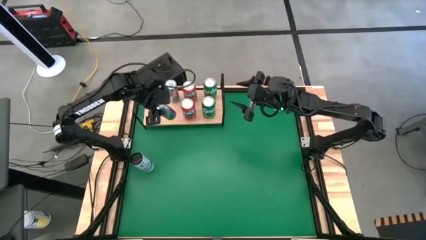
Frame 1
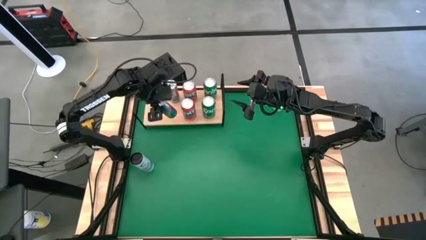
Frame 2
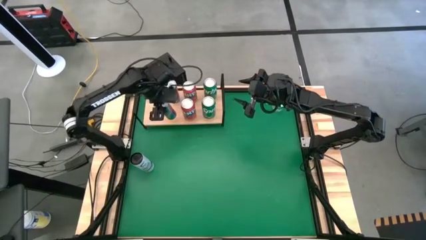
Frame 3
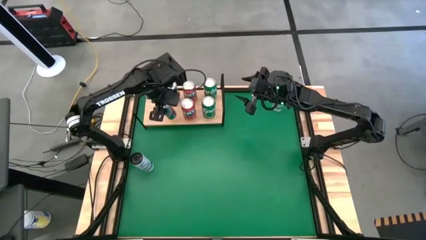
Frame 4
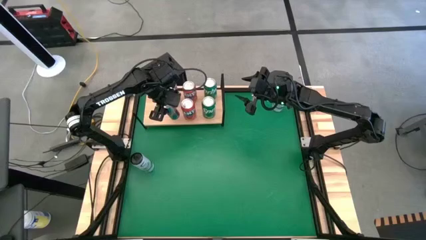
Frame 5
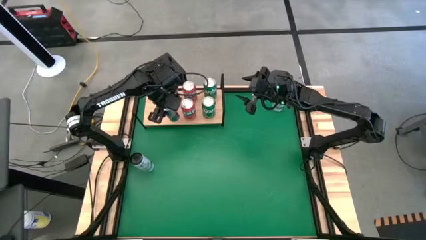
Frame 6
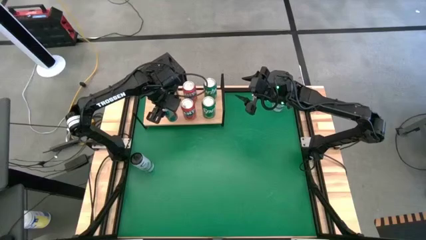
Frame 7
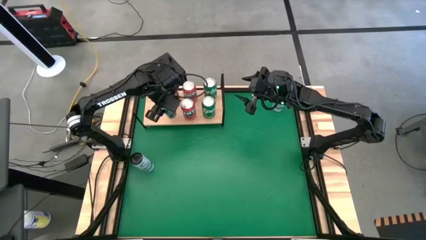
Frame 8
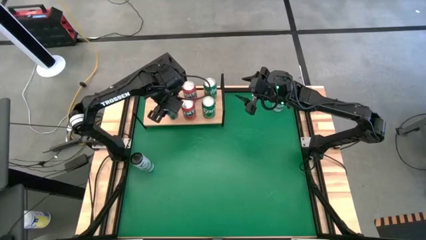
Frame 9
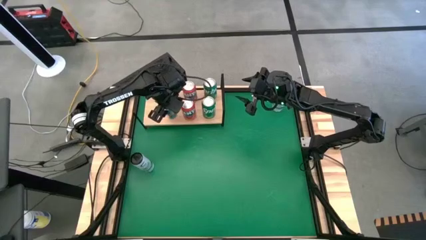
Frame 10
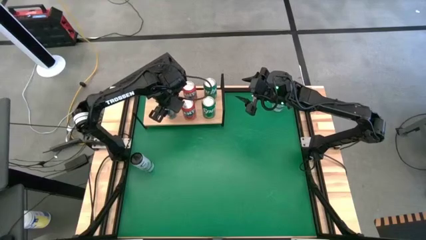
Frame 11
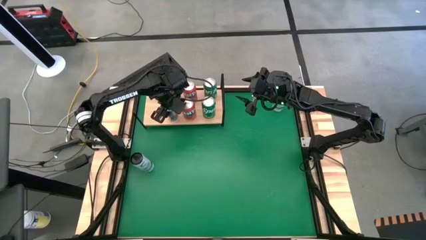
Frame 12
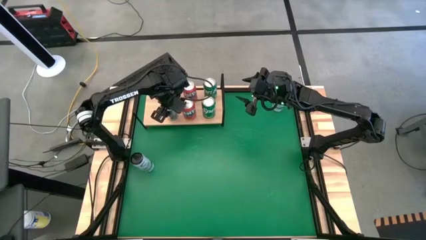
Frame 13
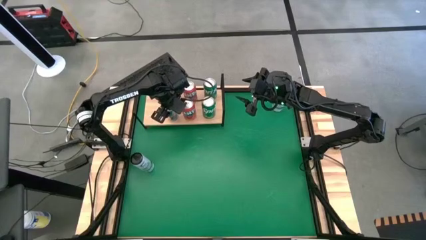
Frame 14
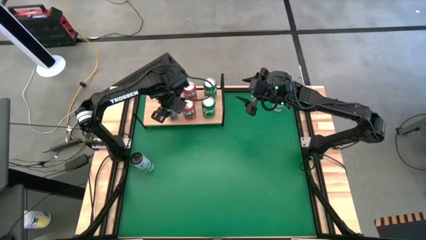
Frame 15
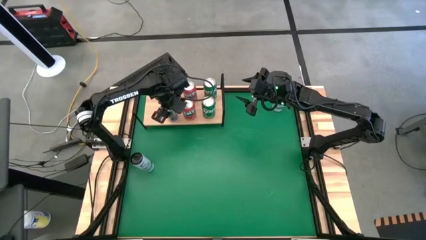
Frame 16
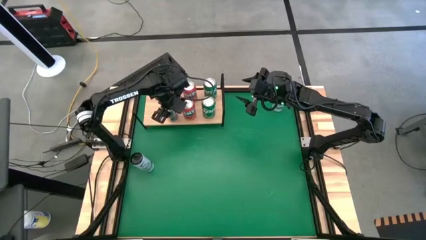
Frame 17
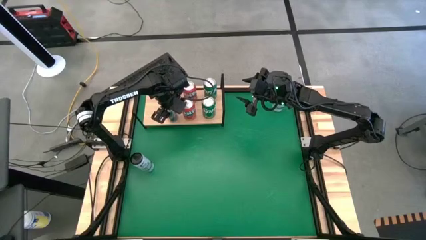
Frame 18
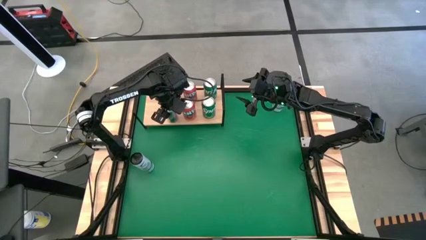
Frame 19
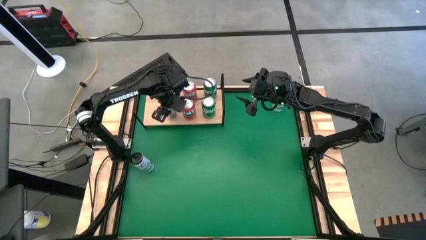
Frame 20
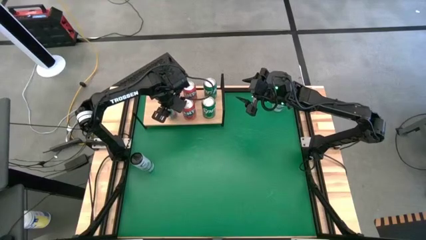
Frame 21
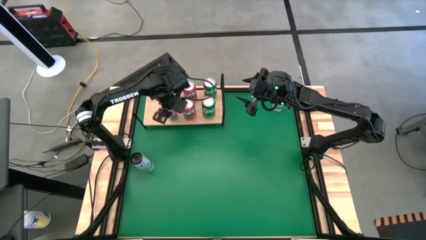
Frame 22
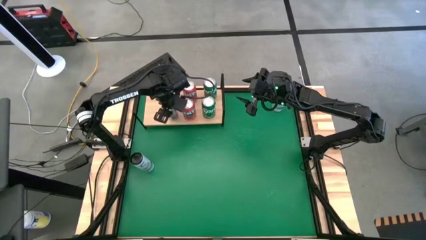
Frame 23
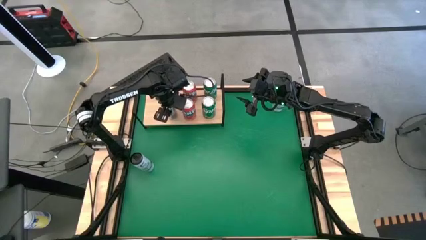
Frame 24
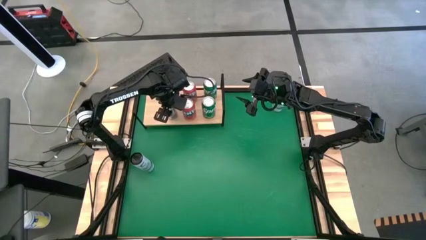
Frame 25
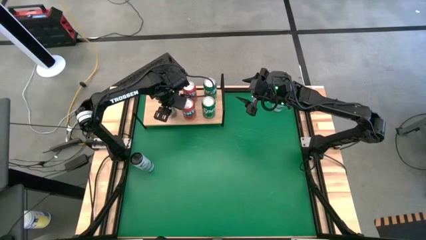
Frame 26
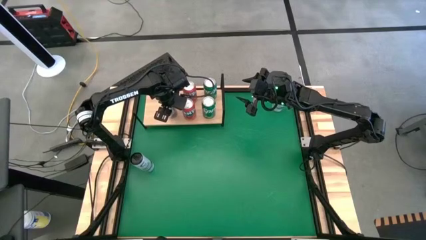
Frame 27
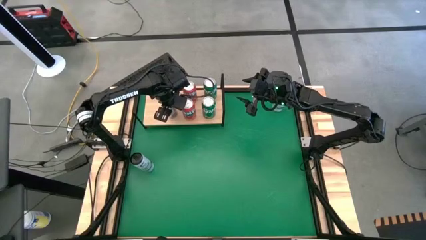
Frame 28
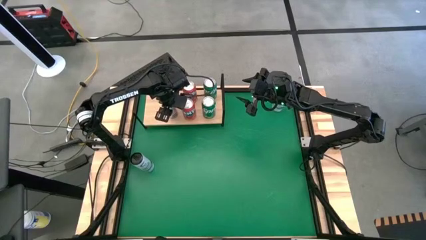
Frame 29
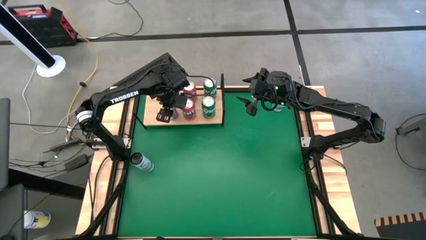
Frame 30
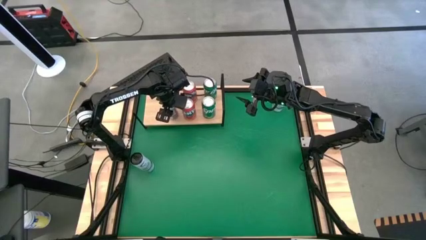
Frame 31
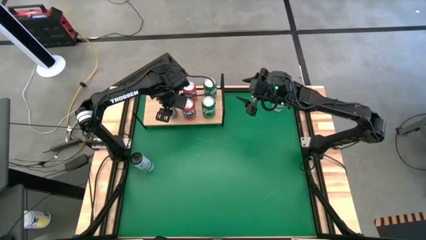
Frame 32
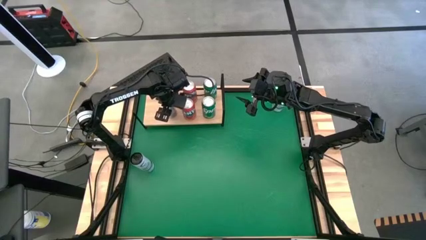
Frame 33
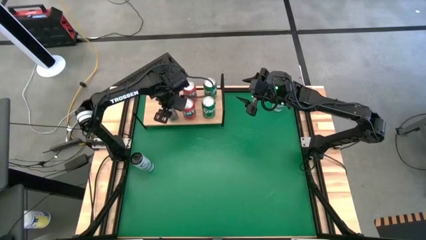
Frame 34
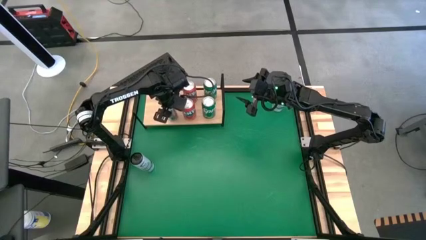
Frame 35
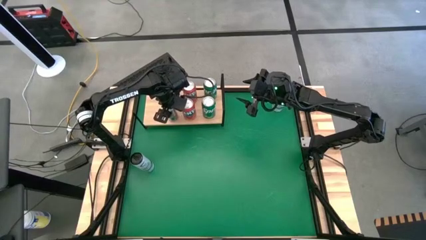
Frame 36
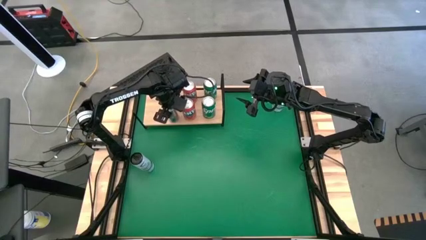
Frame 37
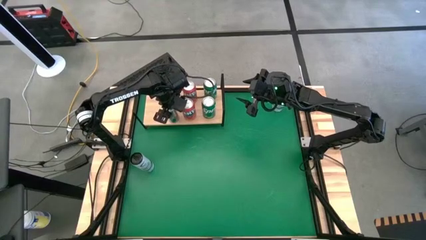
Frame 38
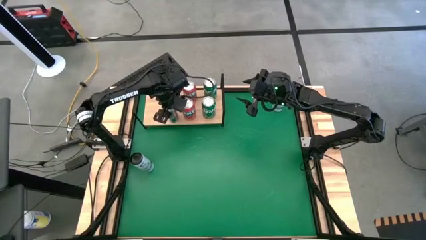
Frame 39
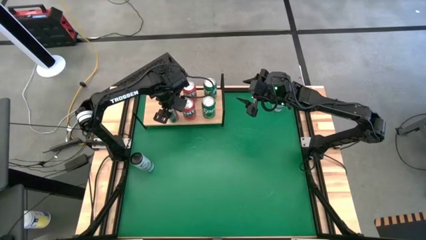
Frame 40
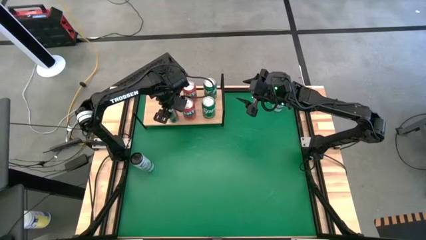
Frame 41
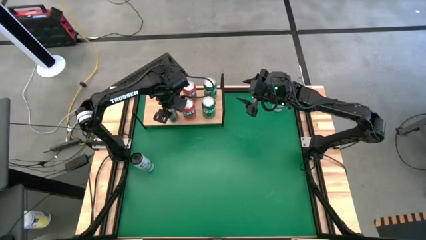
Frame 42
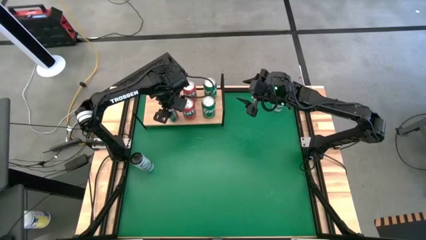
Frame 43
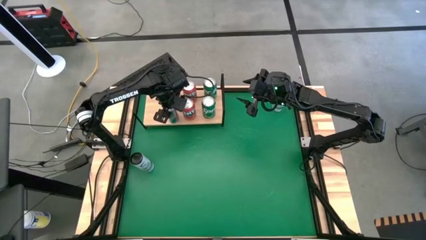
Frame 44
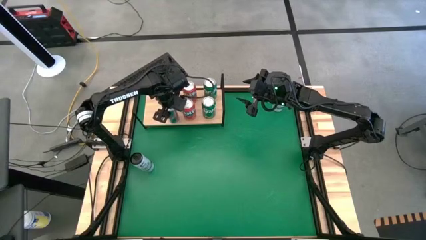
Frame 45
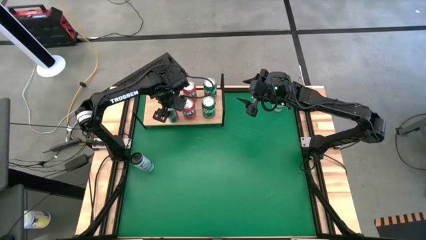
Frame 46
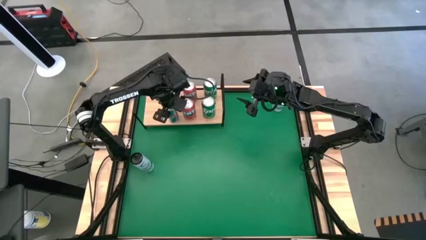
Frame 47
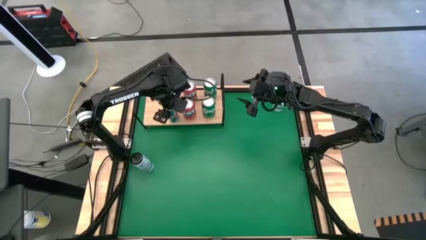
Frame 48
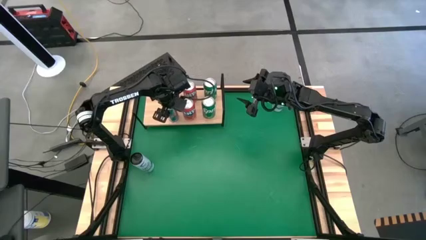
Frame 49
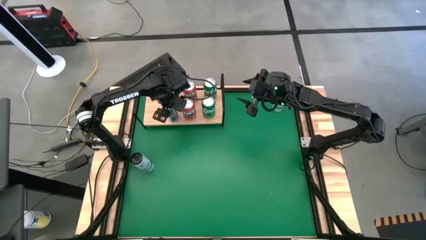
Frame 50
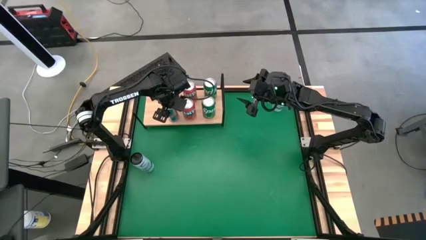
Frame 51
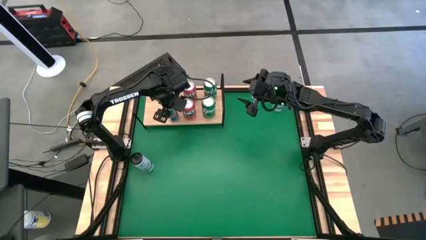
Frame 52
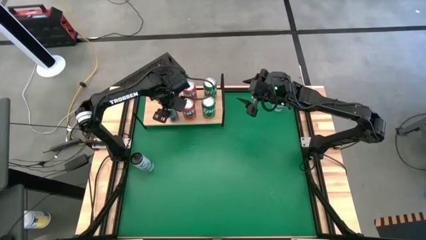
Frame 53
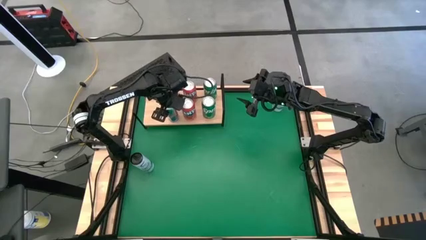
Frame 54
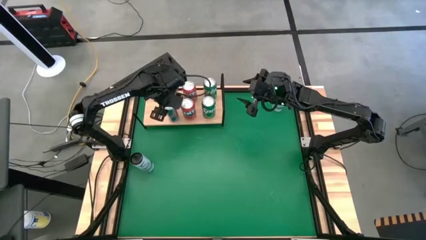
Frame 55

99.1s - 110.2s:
Task: Place canned beverage on shelf
Put the blue soda can aligned with the other blue soda can on the shelf

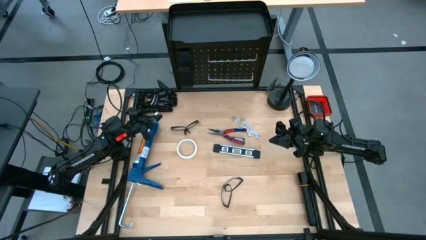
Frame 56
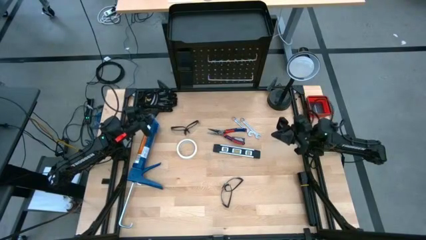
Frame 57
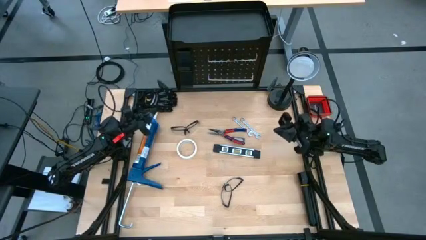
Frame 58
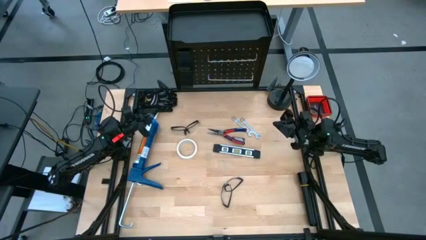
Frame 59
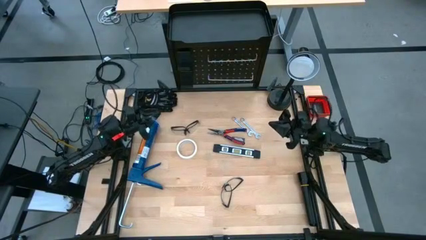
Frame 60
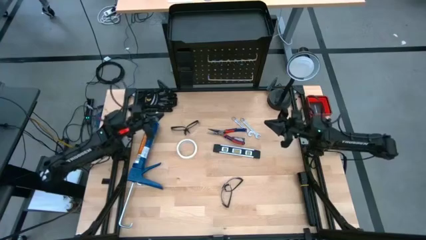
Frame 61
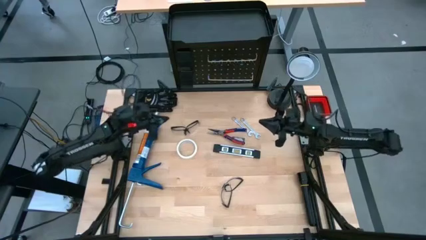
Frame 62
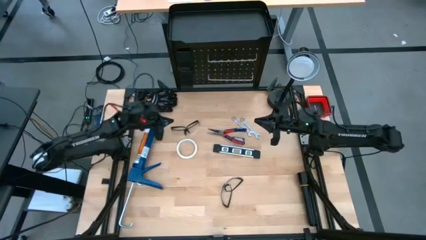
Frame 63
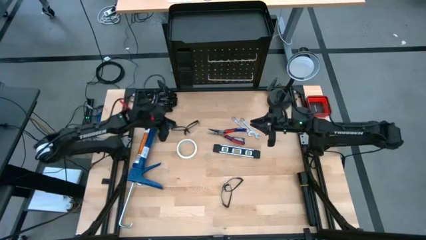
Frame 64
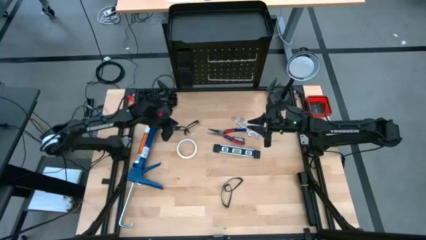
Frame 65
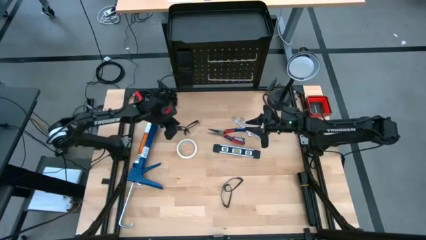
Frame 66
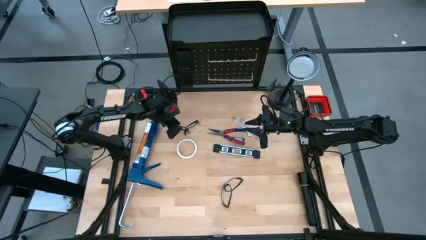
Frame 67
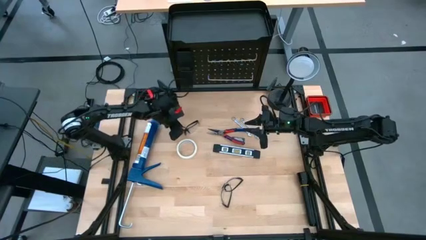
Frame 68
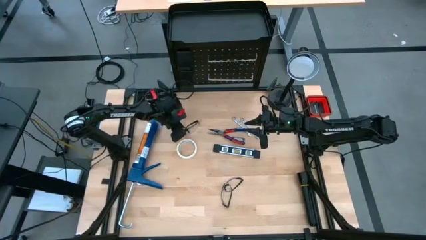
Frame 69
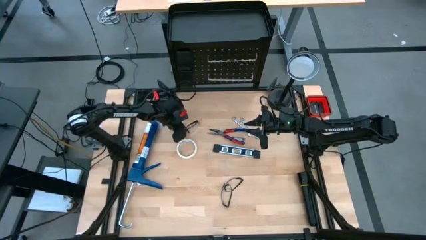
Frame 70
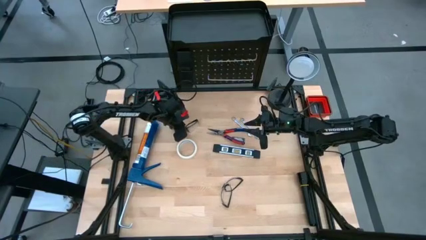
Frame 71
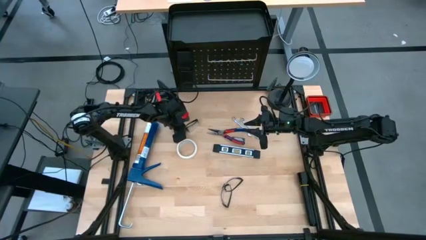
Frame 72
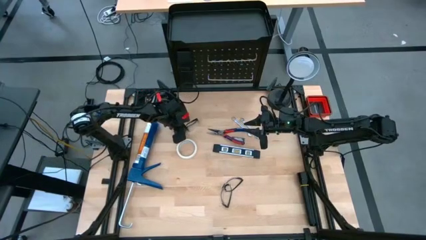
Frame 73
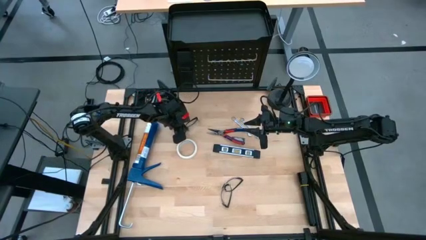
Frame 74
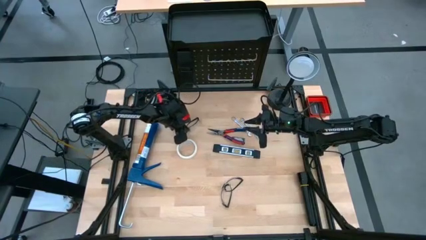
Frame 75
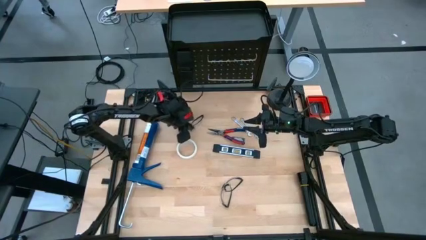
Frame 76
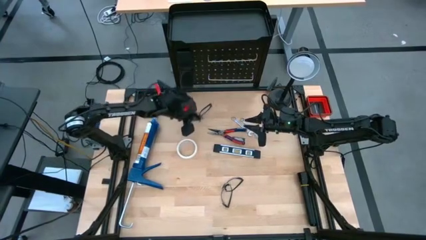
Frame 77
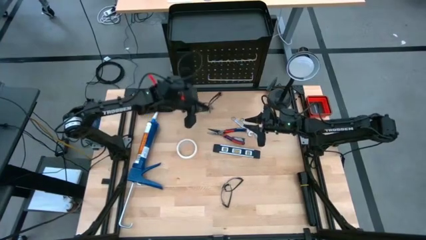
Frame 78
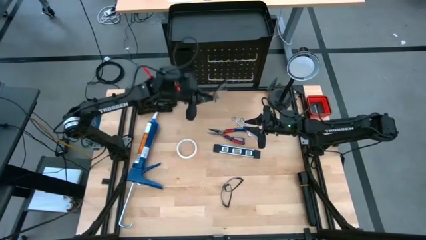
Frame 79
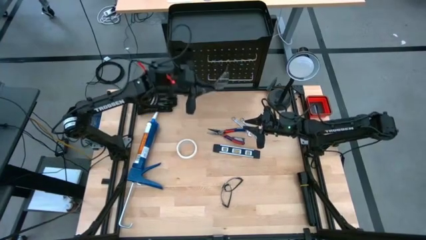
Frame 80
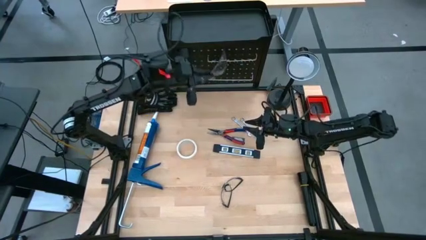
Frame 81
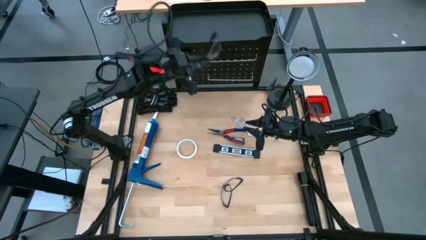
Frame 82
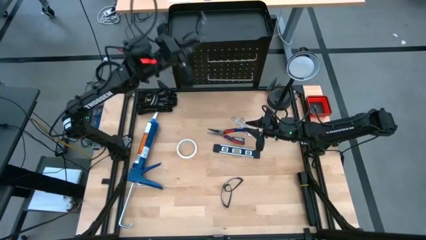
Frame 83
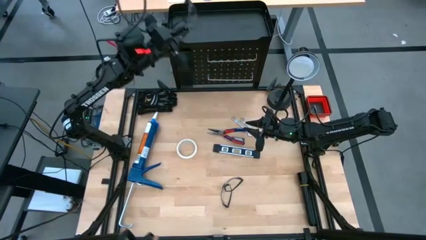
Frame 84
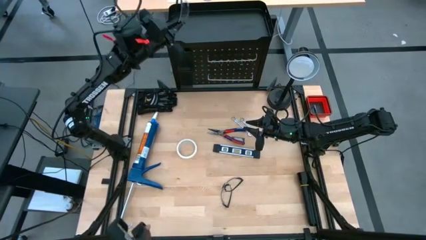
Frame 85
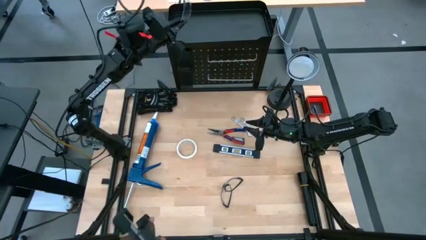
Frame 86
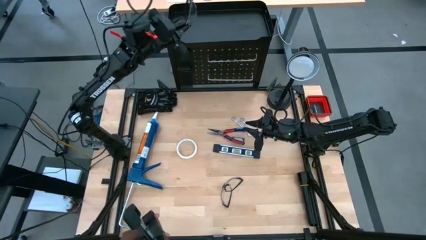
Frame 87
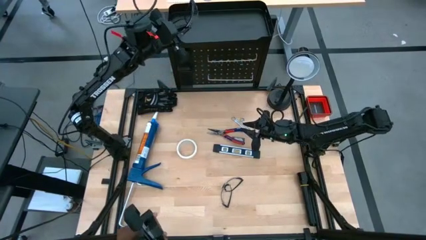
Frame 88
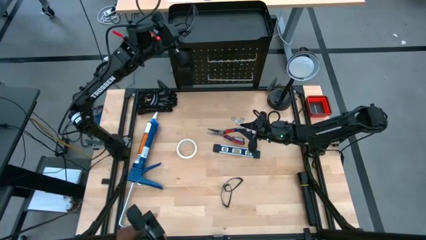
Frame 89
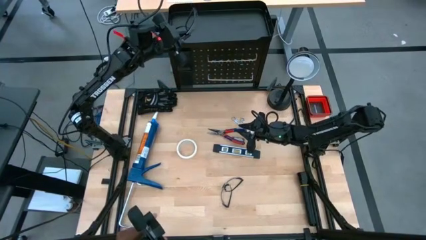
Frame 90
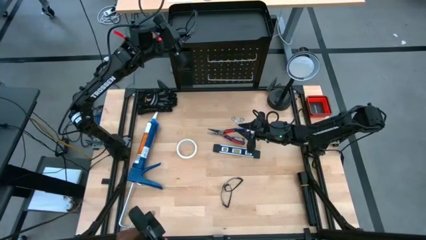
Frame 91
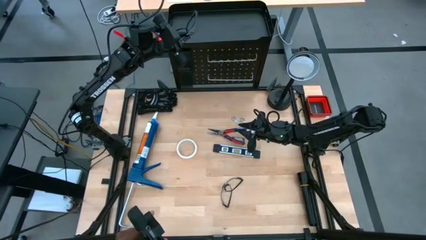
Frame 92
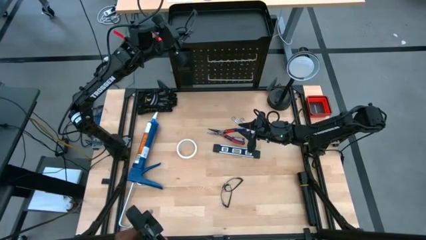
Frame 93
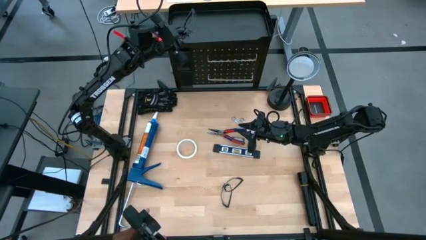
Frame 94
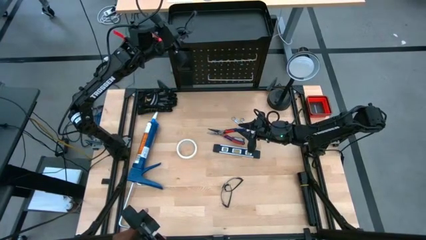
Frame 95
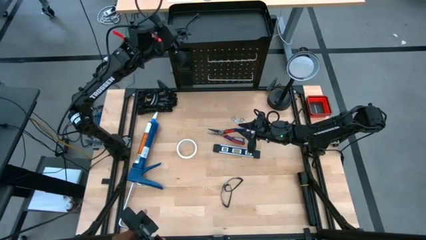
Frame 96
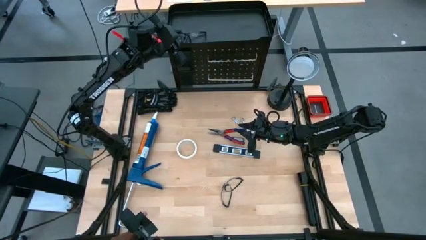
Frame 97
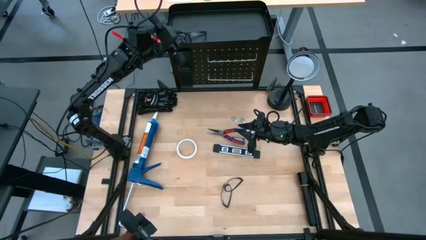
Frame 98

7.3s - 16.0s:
Task: Hang tools onto peg board
Put the top black safety glasses on the black peg board
